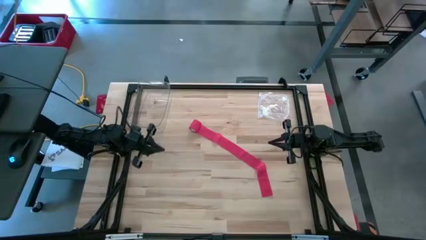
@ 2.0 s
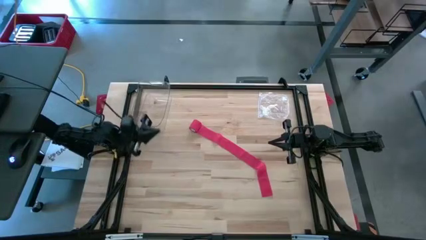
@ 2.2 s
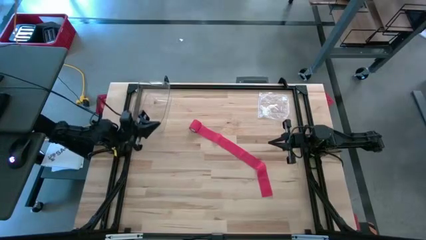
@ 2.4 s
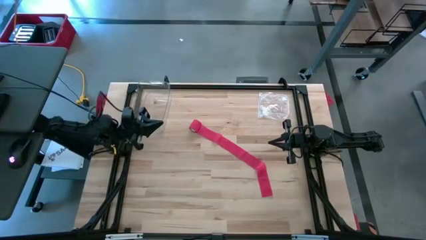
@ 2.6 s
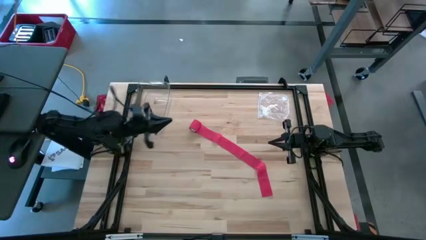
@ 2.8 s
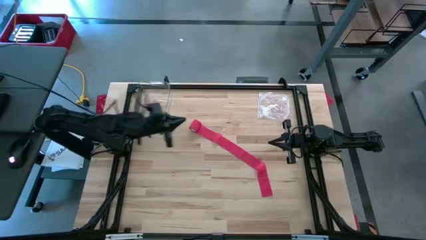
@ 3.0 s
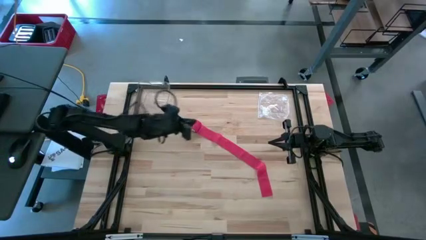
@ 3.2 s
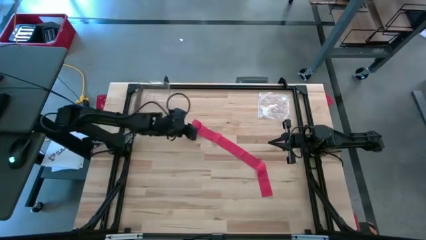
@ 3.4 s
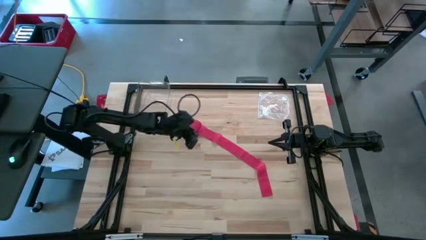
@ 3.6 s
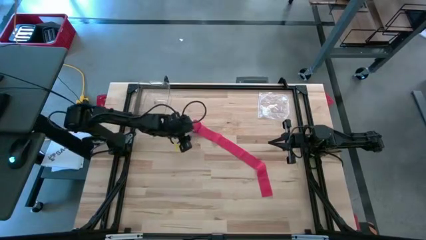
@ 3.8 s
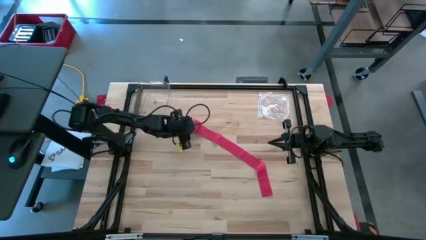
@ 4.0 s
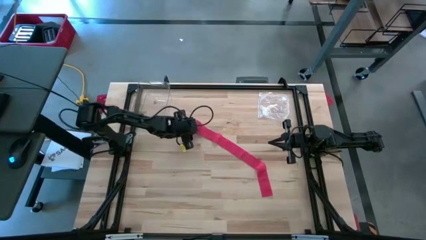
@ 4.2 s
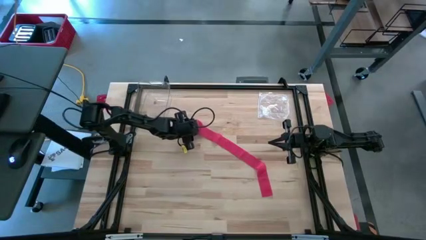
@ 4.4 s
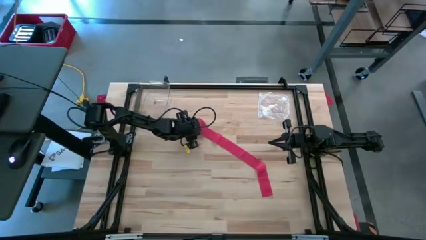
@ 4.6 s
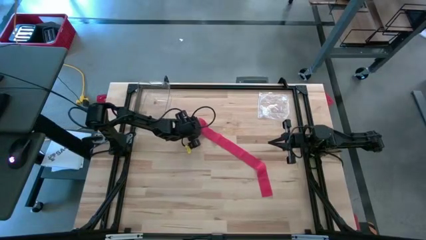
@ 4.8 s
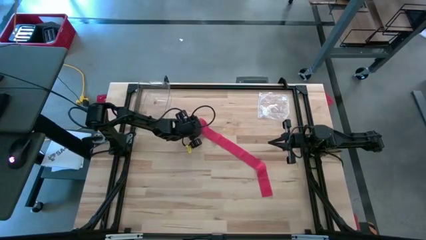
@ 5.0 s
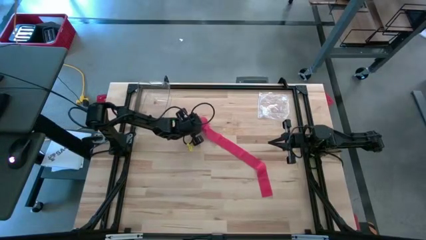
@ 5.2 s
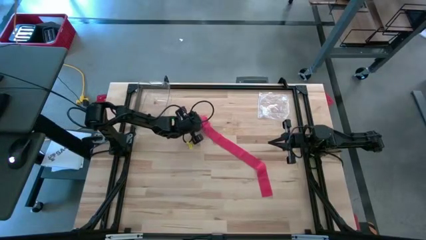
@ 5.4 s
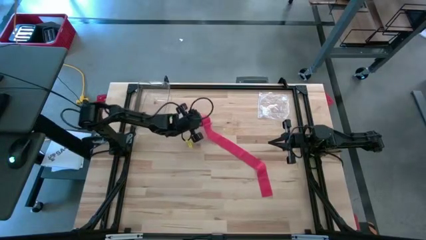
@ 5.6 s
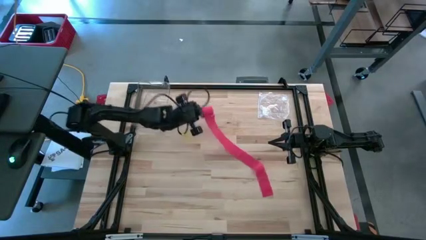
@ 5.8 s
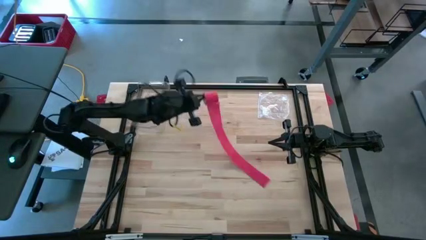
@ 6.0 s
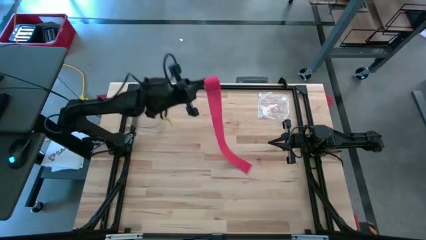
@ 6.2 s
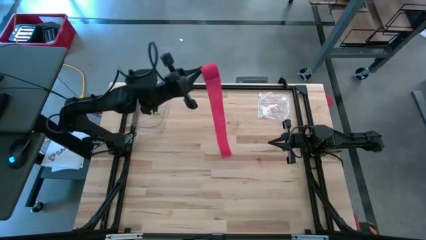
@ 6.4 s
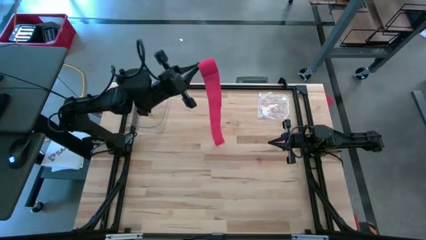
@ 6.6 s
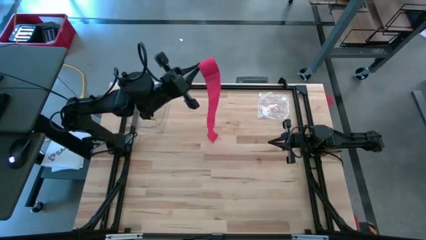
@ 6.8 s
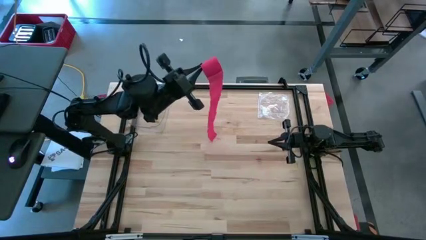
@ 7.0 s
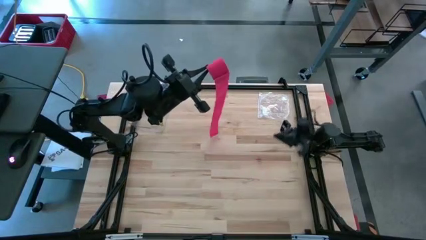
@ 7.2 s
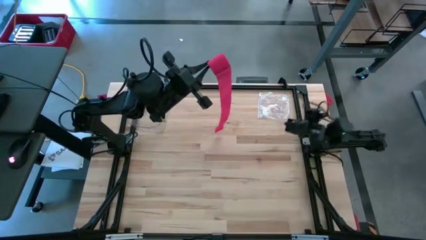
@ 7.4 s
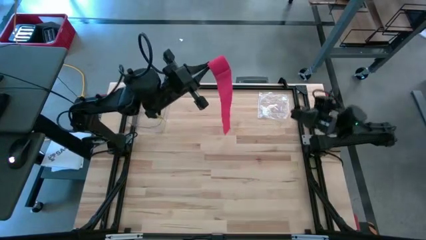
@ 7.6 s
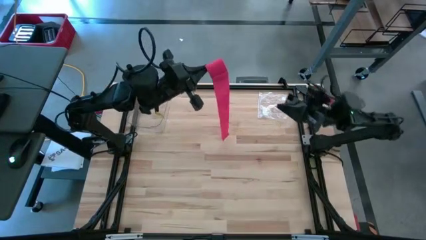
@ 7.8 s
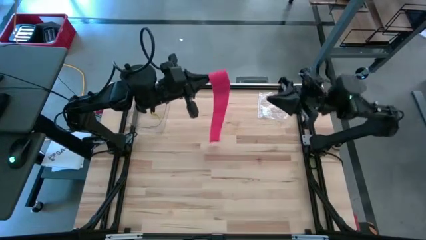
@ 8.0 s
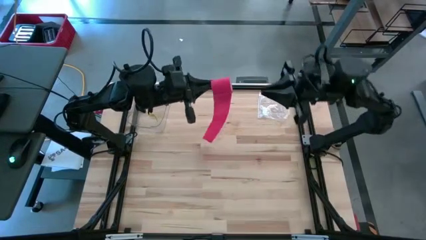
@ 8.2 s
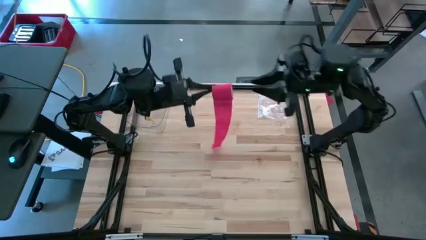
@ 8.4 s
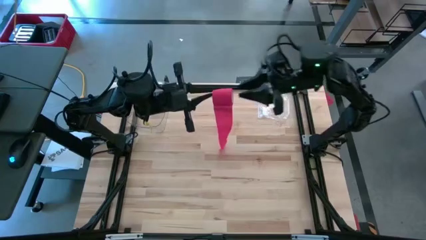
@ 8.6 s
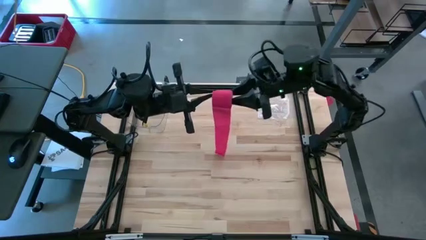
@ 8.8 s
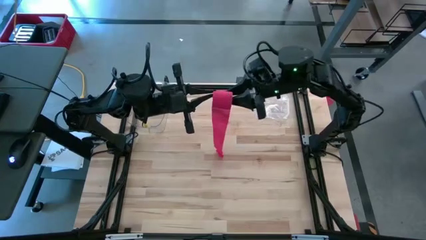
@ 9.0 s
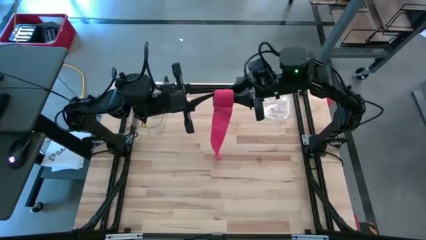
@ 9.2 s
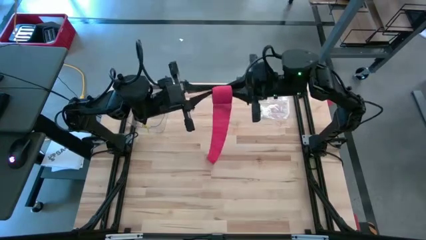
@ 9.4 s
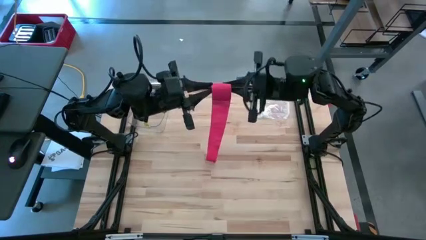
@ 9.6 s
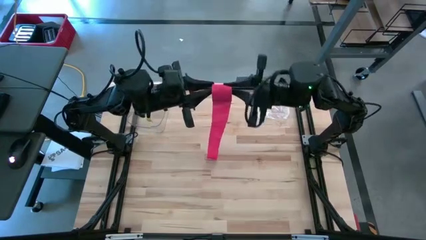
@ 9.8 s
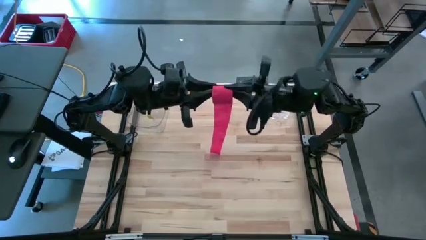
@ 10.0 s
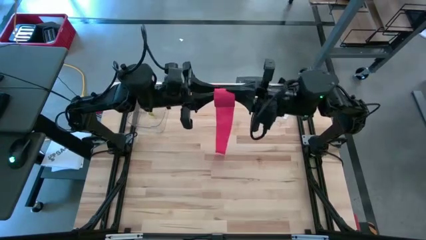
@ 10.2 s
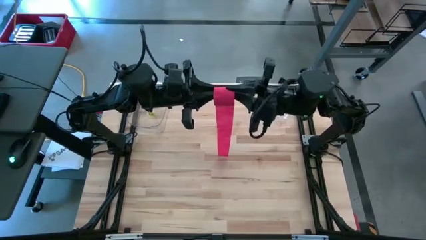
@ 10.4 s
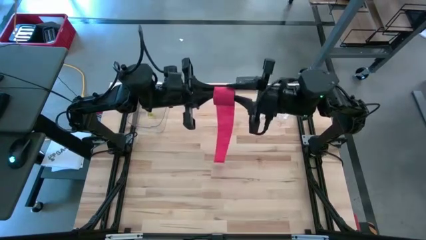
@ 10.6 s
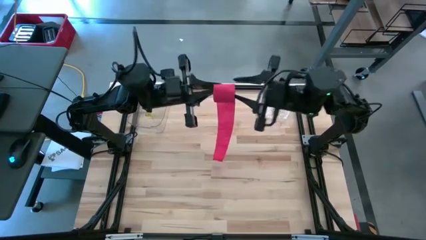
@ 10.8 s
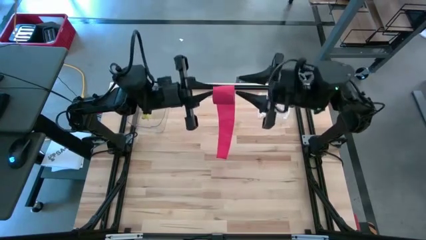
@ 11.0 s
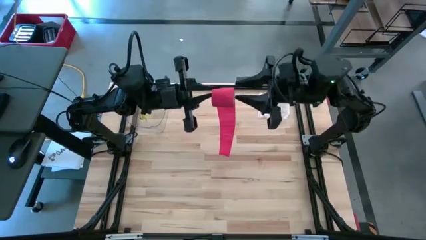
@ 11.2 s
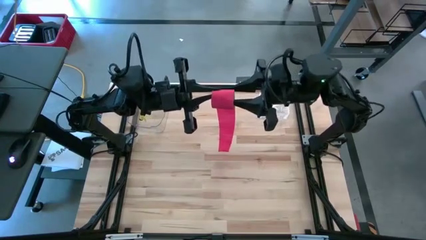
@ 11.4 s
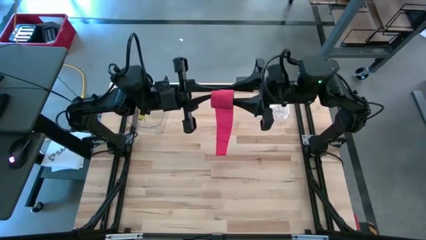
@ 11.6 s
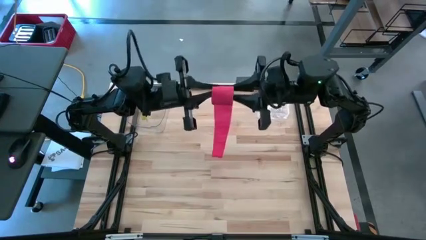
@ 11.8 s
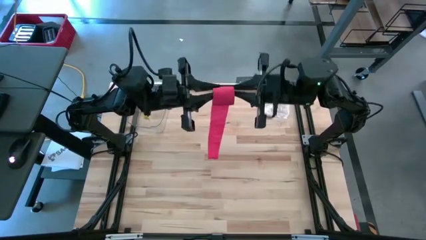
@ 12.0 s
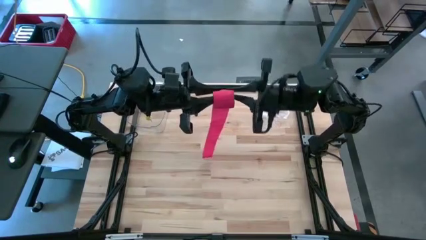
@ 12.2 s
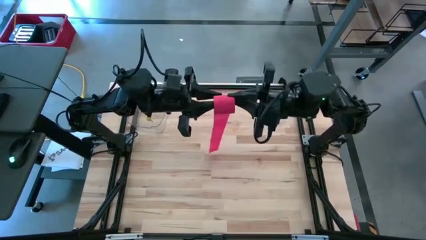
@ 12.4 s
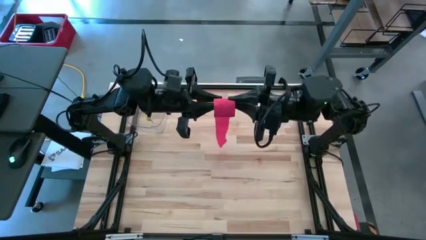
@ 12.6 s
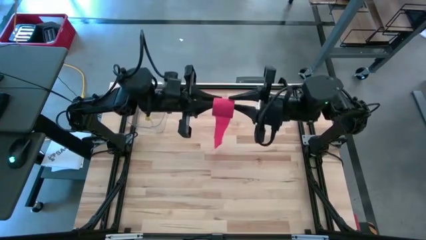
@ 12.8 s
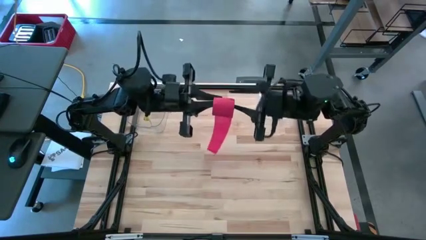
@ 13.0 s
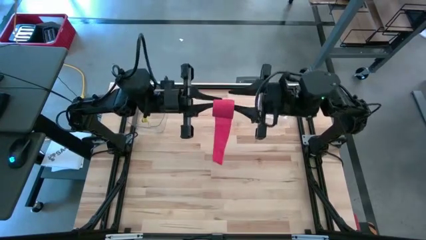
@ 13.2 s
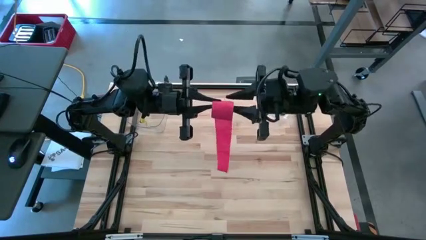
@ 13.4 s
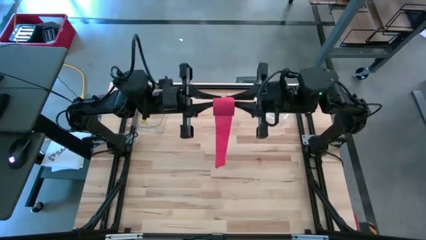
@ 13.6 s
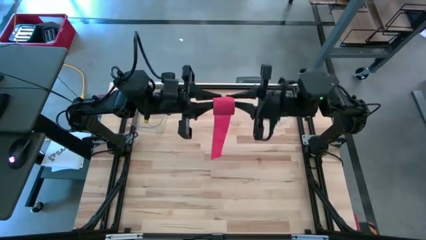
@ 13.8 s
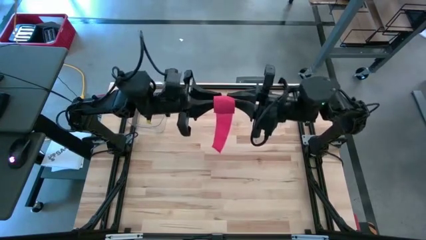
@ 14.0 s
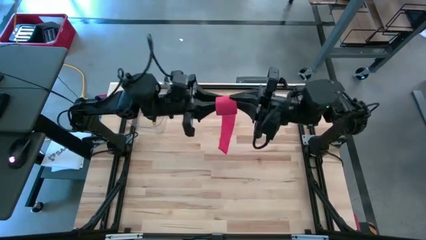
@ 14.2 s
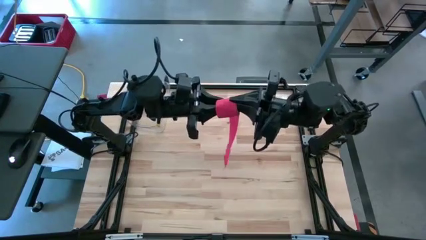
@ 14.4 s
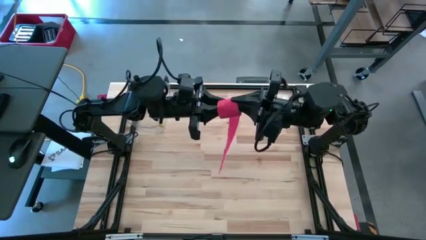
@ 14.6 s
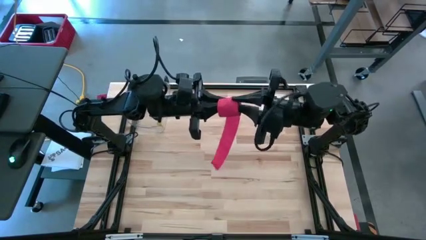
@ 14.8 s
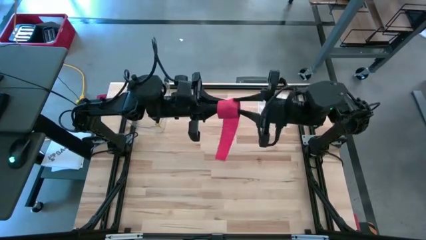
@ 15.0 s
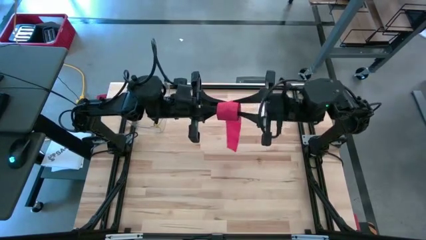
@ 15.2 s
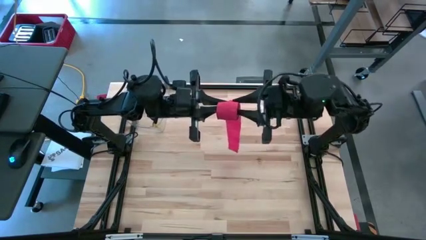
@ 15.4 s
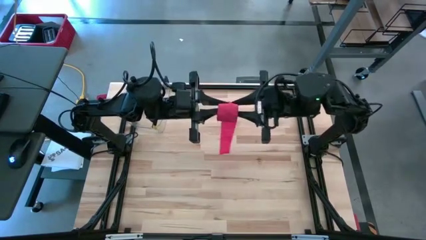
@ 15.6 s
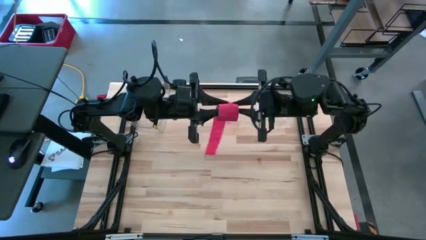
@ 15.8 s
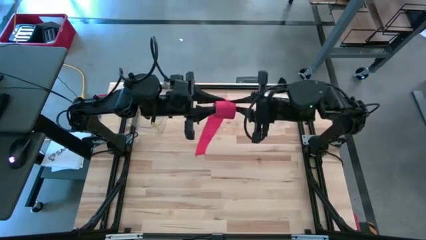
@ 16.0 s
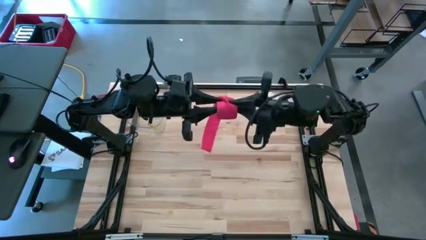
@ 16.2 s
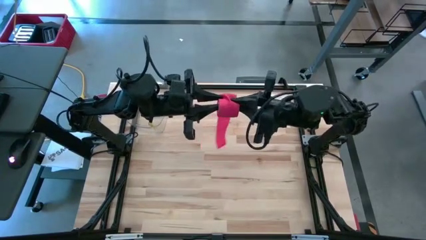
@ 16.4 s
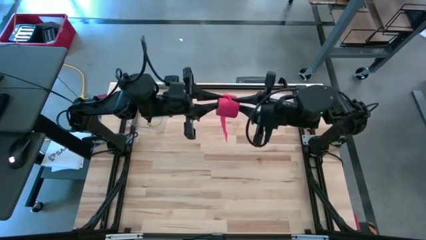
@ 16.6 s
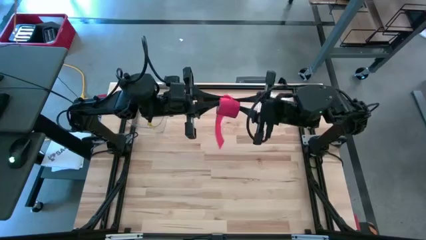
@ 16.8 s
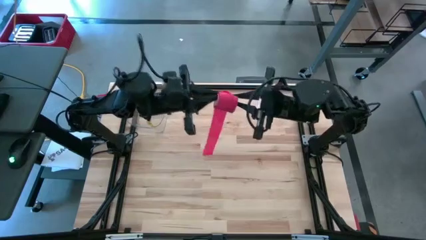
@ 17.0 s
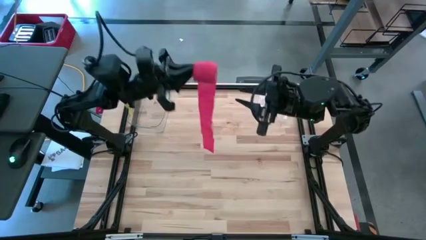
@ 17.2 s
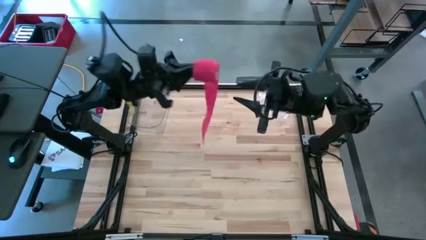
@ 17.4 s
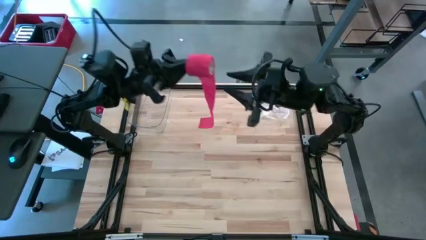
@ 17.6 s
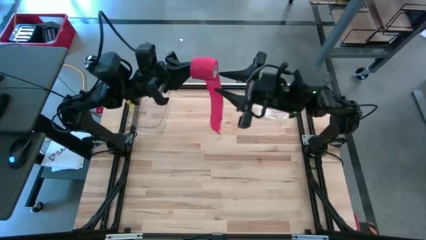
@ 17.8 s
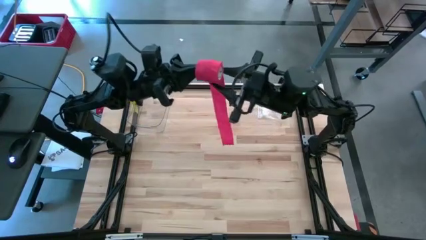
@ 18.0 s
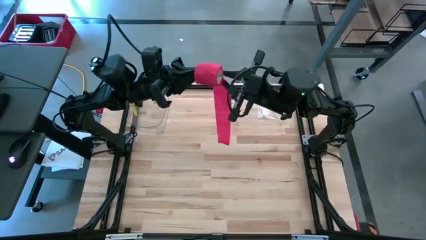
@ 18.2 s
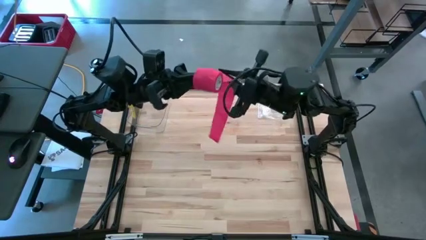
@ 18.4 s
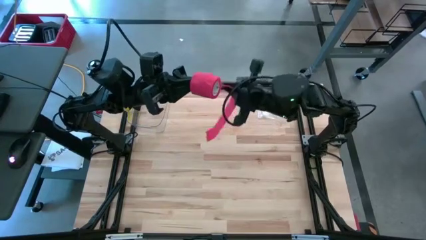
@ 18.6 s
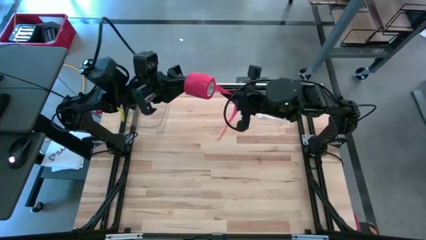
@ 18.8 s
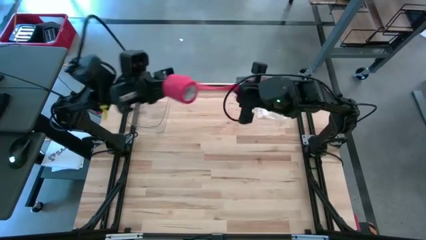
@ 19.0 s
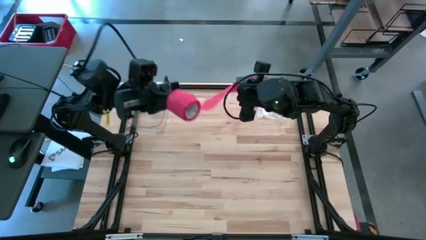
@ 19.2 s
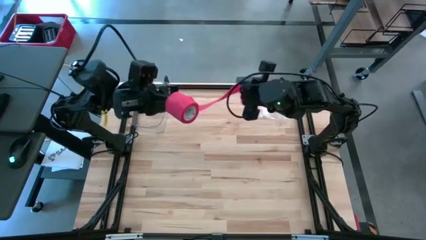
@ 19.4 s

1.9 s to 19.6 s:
Task: Roll bandage
Roll the red bandage
